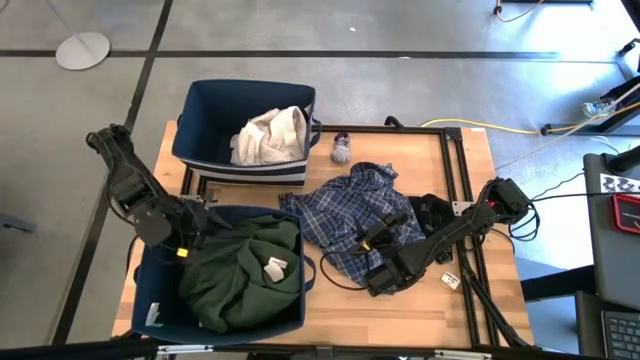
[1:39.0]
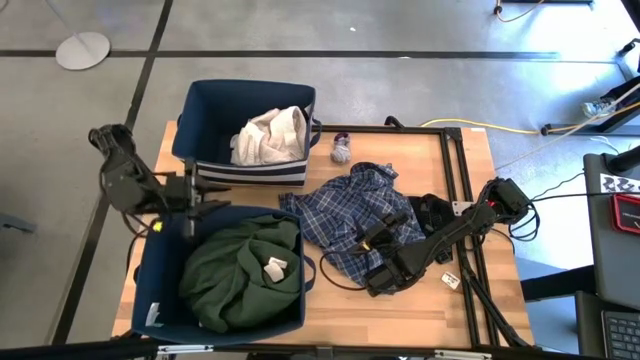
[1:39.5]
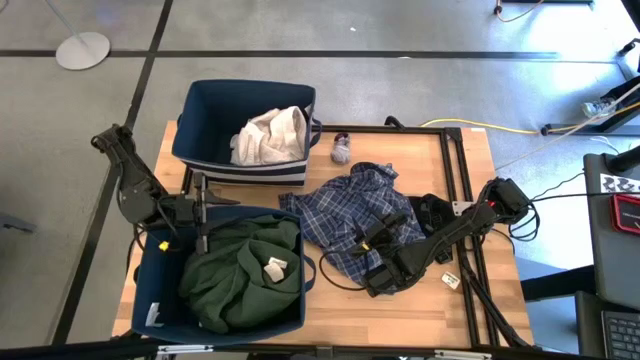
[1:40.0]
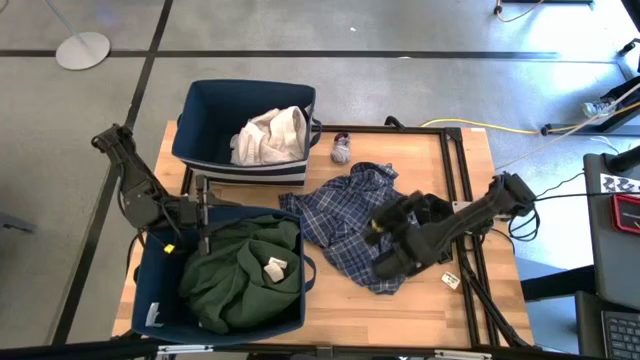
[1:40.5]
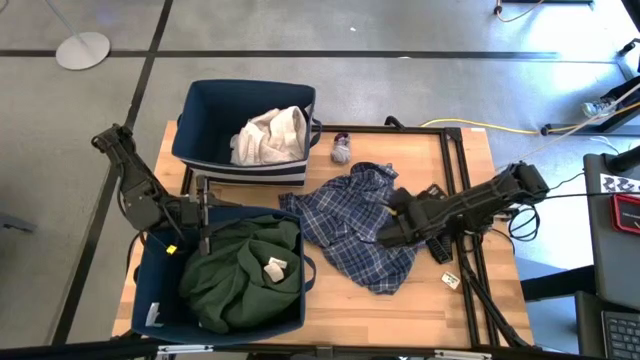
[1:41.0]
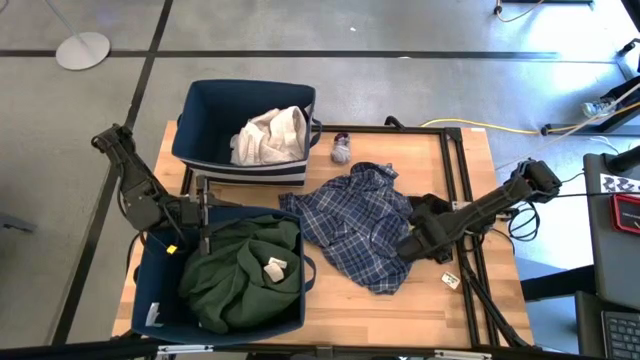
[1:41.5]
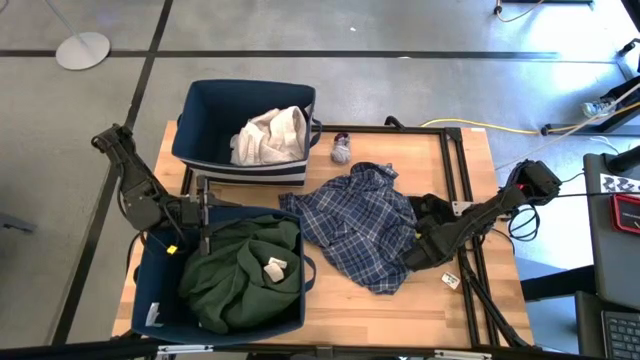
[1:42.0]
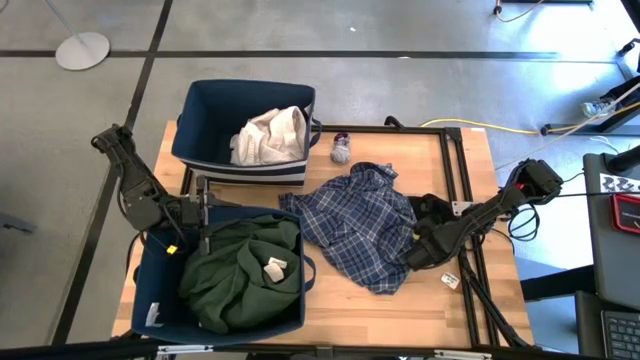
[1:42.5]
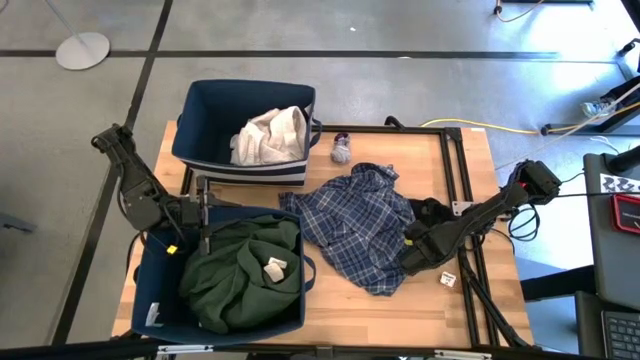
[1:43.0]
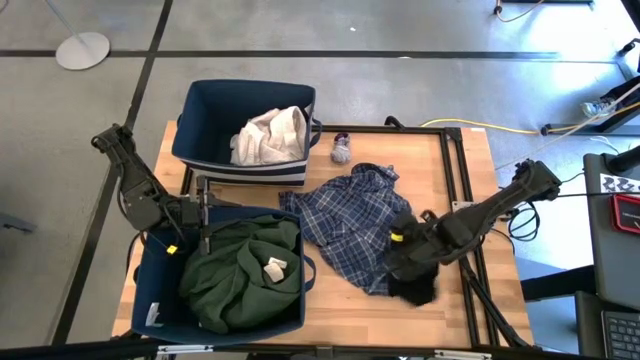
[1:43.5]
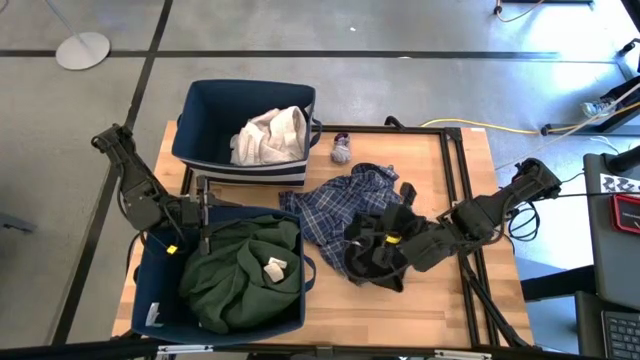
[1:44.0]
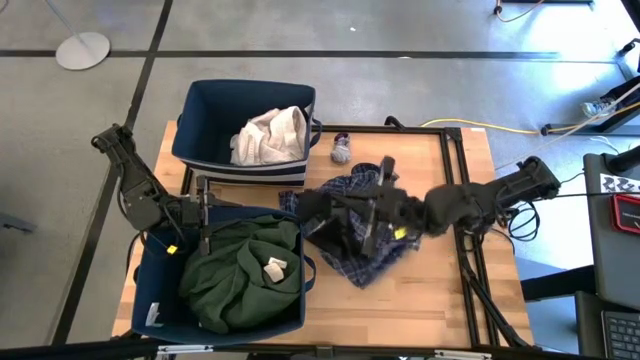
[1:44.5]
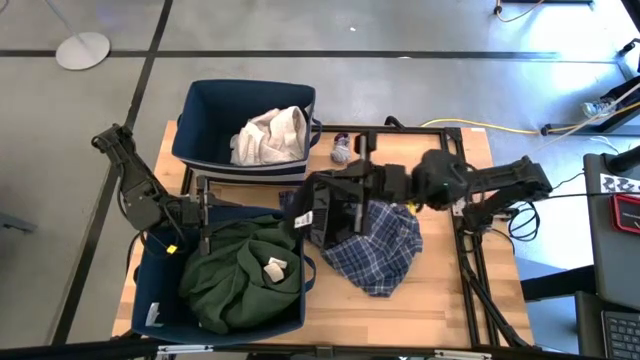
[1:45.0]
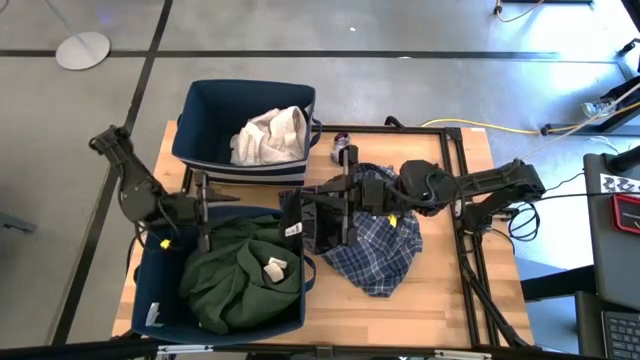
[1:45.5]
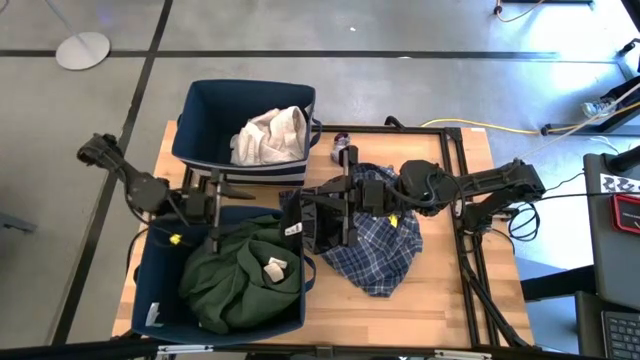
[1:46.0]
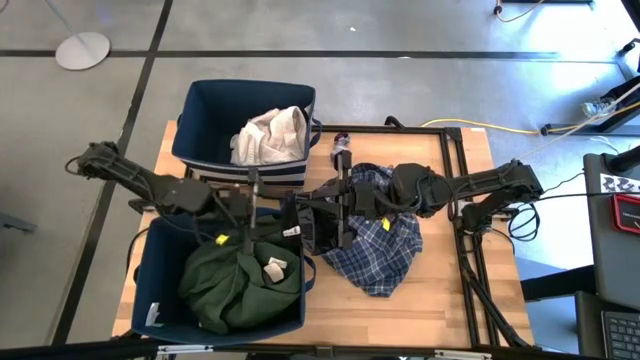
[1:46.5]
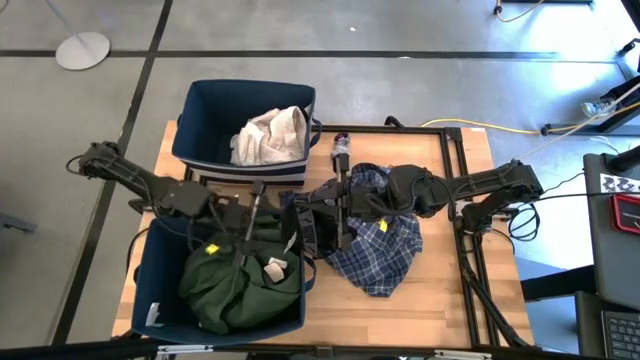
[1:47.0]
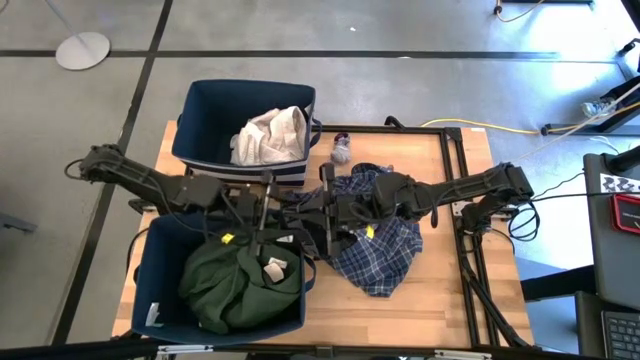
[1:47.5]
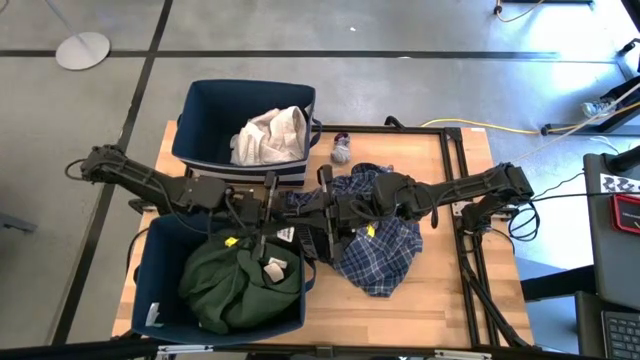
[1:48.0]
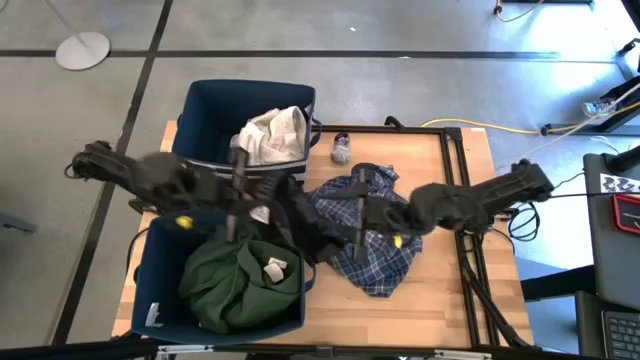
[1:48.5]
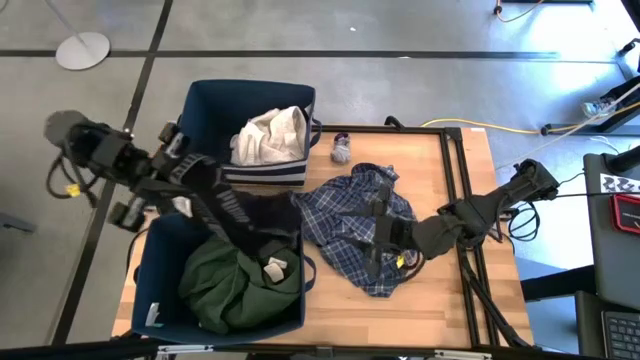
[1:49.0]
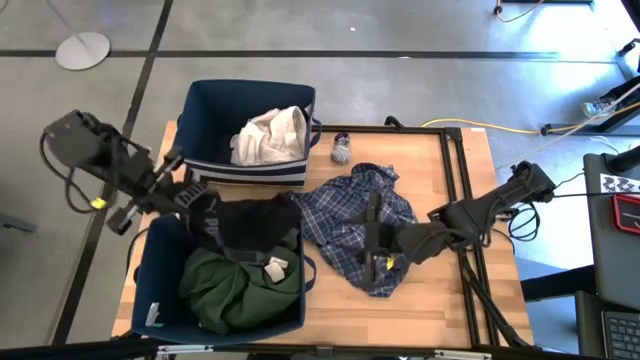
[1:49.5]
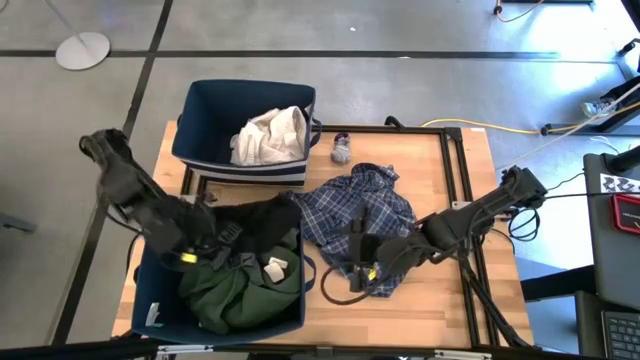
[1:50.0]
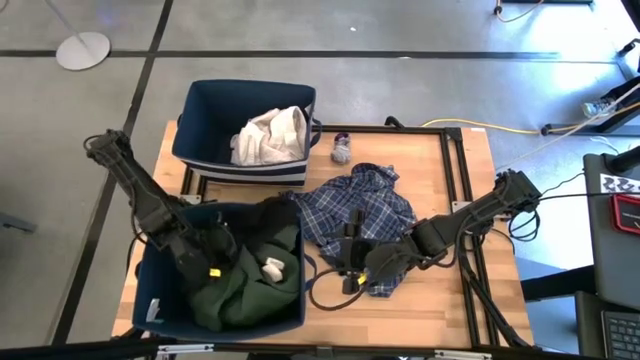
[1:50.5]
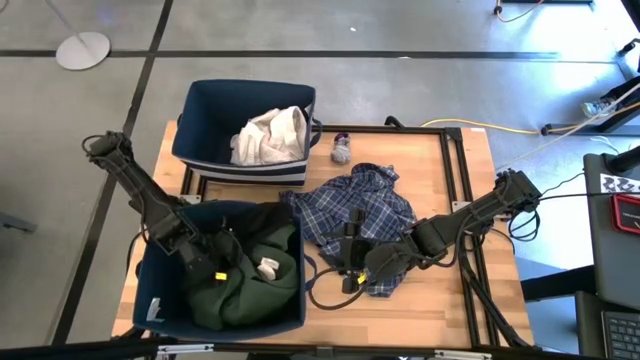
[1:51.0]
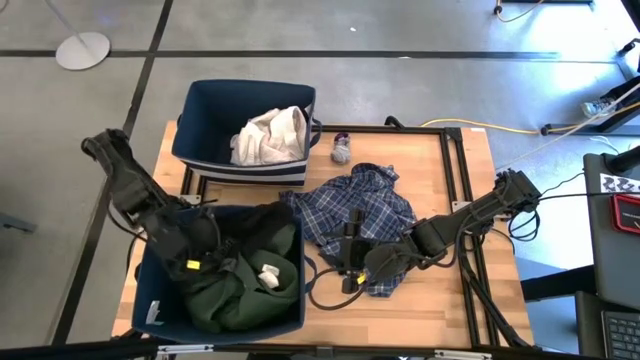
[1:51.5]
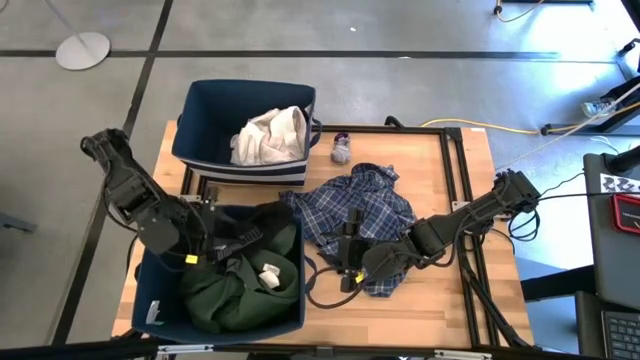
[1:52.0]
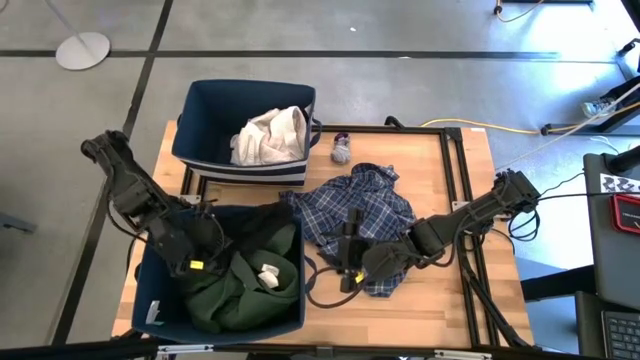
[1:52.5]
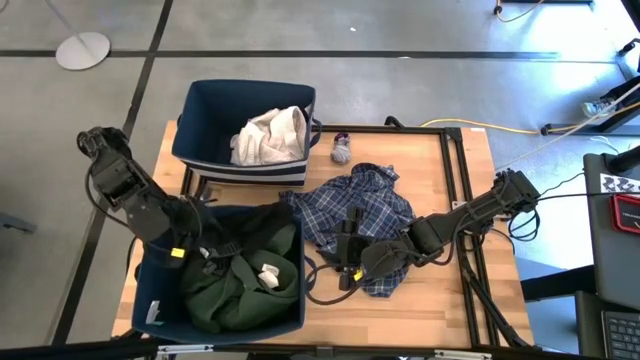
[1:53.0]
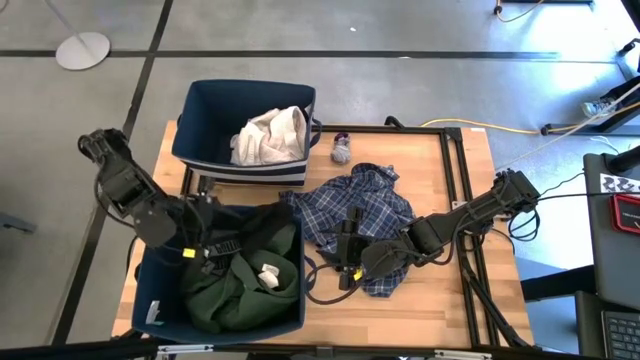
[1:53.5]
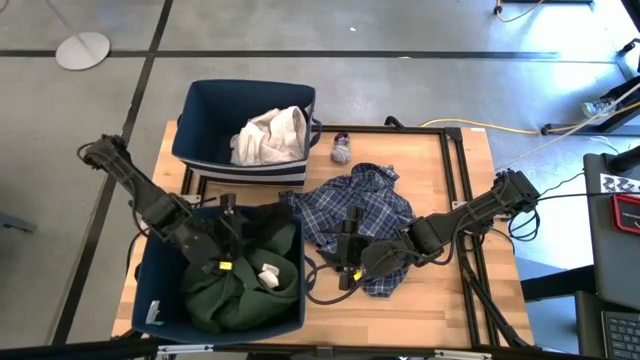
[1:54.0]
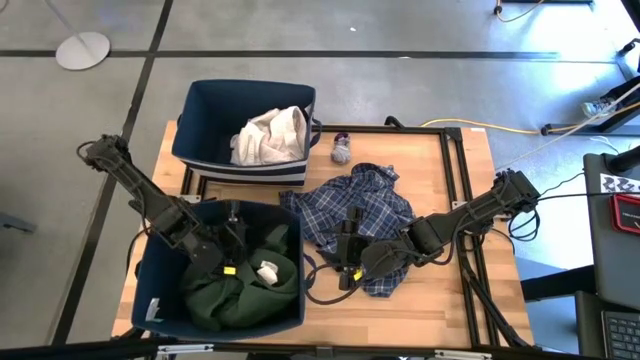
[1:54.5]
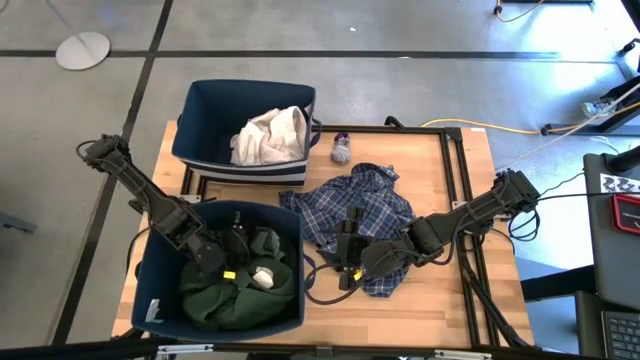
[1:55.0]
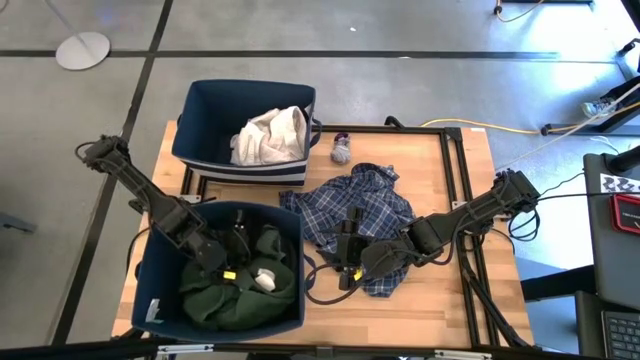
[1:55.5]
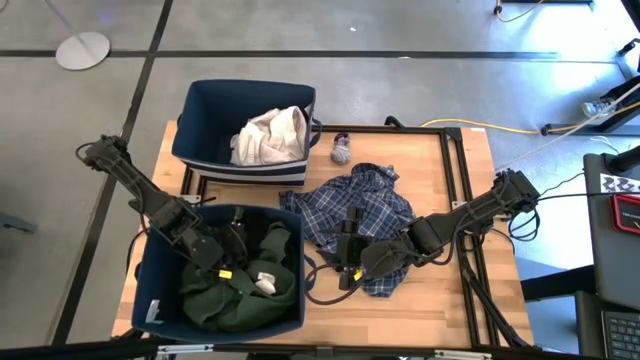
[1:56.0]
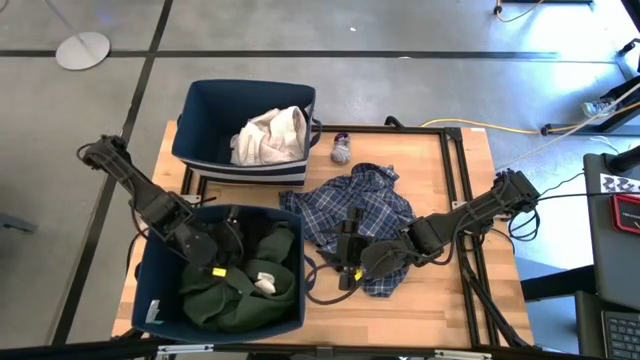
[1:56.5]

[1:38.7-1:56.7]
Task: Sort clothes
Put the black boxer into the bottom blue laundry organizer
